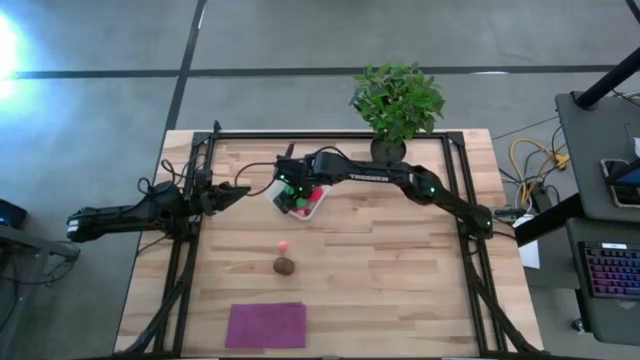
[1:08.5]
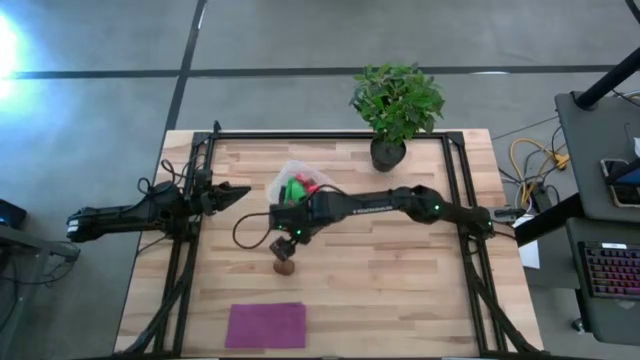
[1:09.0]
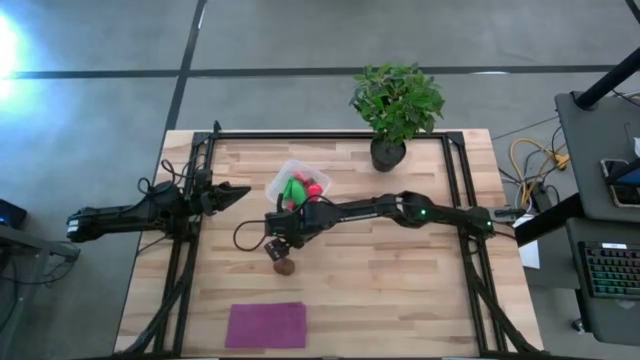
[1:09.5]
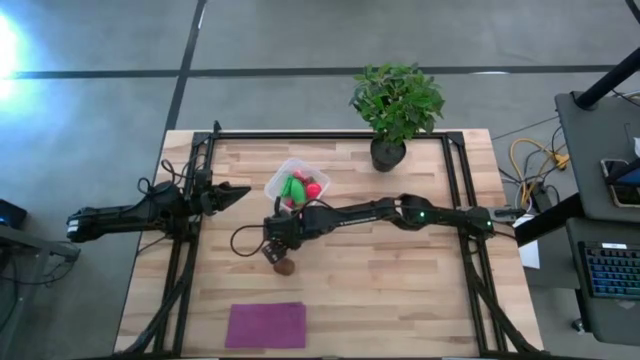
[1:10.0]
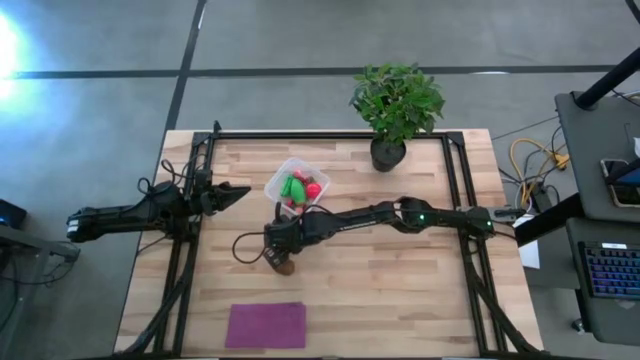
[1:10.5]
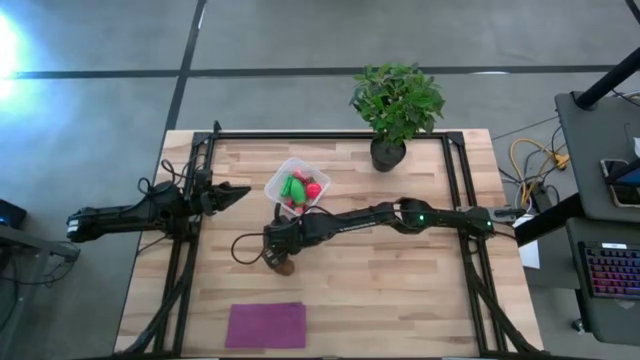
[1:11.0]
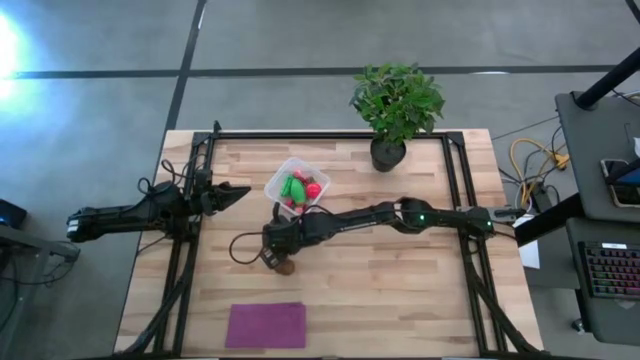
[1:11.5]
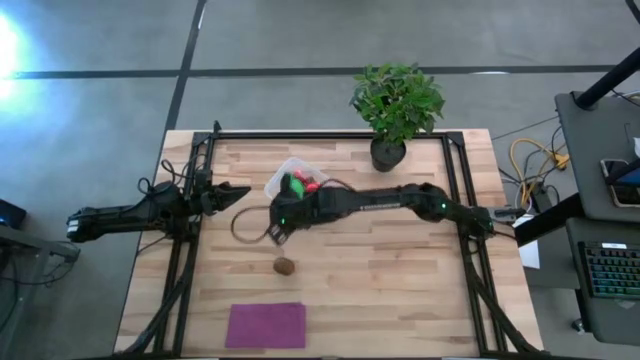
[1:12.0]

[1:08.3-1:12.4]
Task: Pick and placing Produce into tupperware
Put the peach into the transparent bin

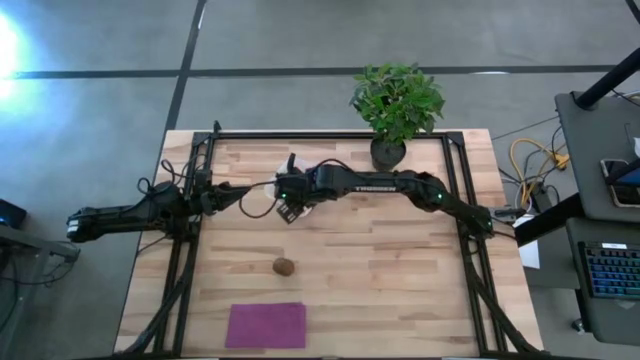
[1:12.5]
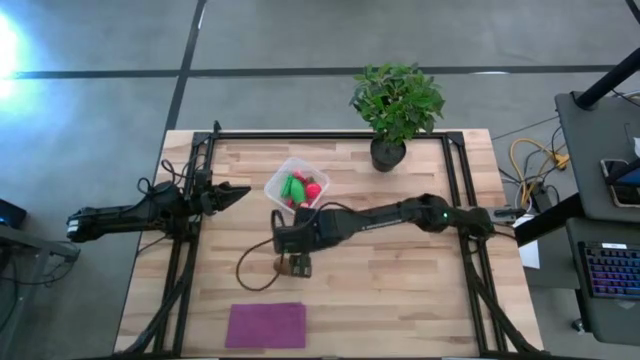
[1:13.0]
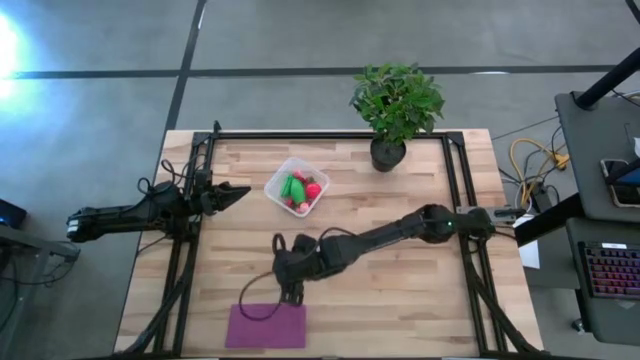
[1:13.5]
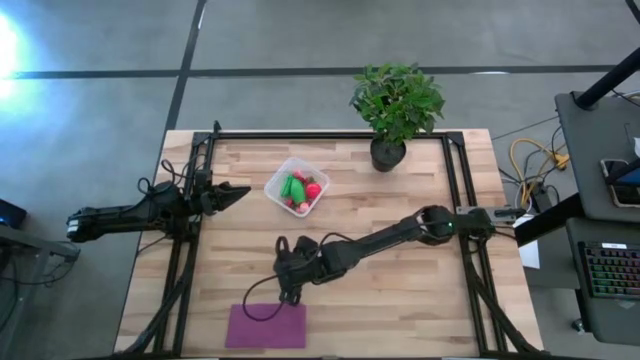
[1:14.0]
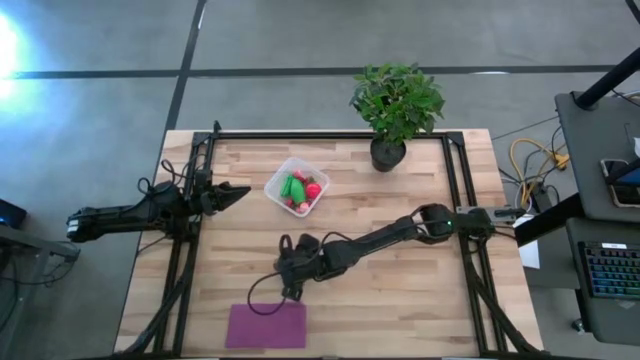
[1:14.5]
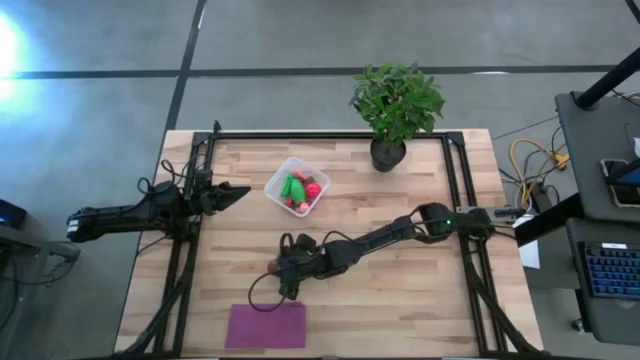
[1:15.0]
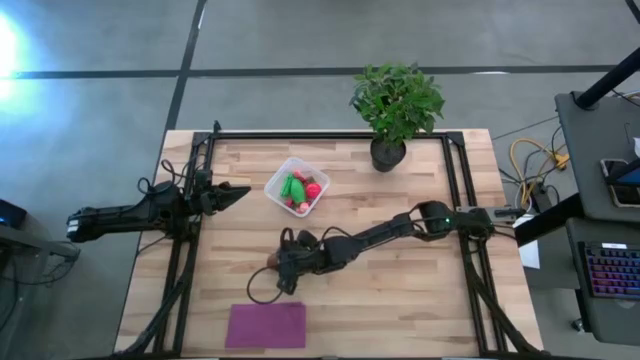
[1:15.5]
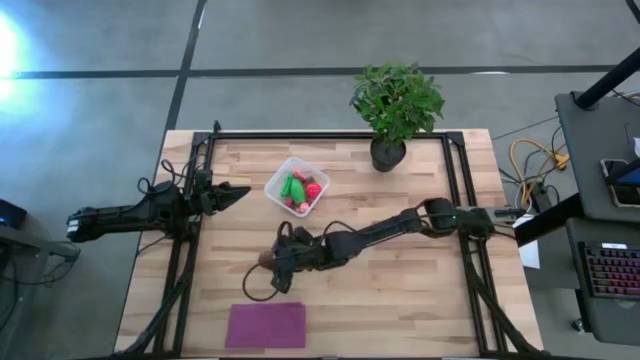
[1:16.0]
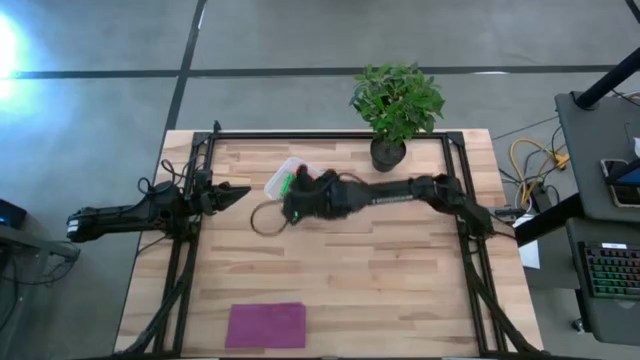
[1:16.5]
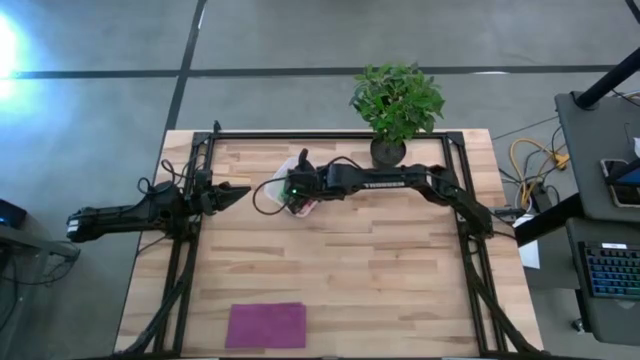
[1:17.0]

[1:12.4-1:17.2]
Put the kiwi into the transparent bin

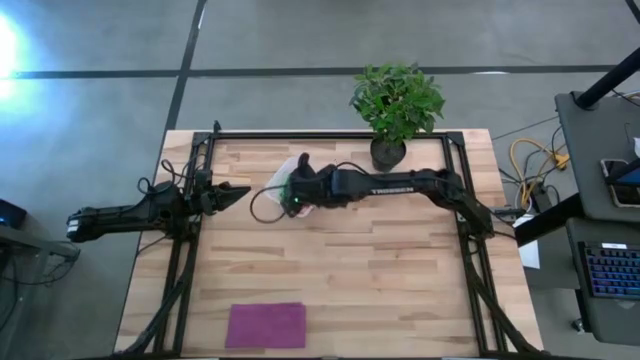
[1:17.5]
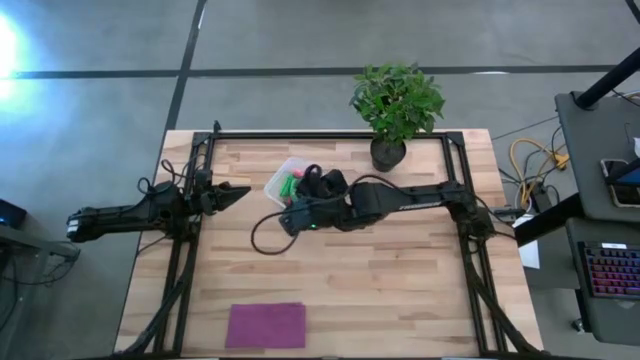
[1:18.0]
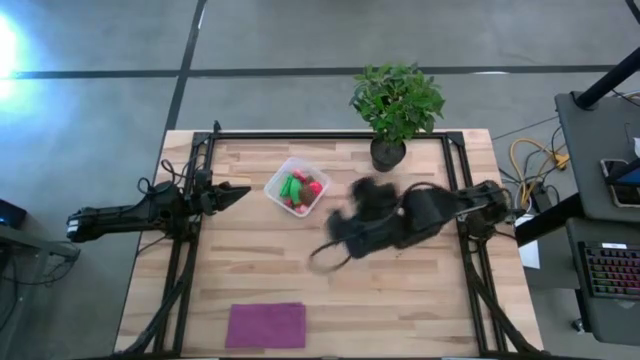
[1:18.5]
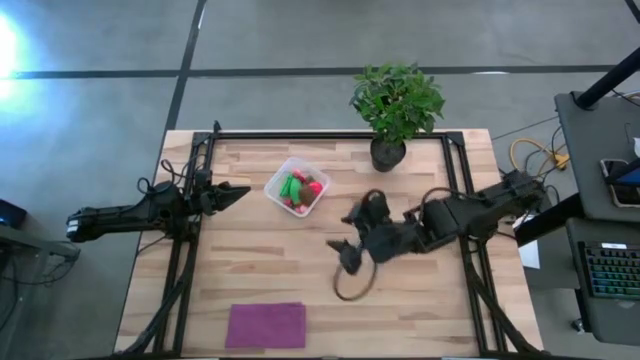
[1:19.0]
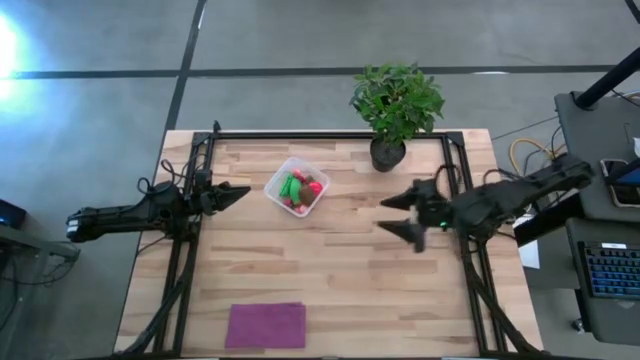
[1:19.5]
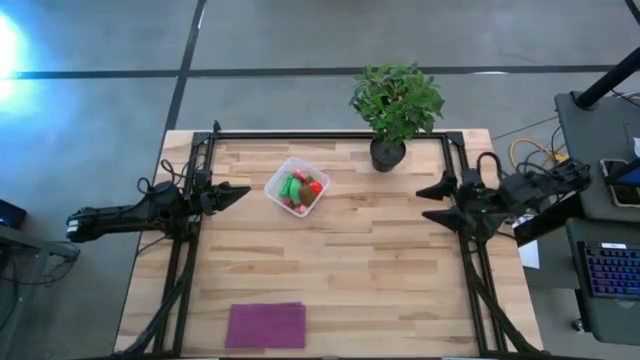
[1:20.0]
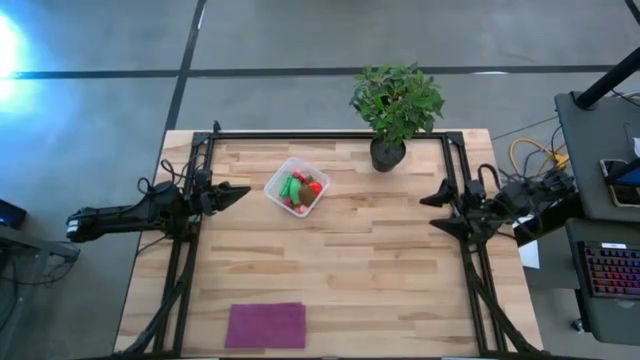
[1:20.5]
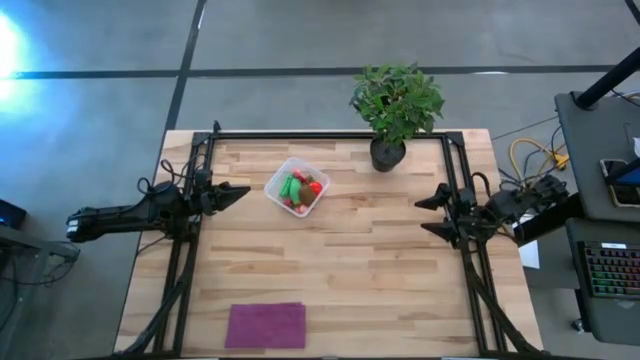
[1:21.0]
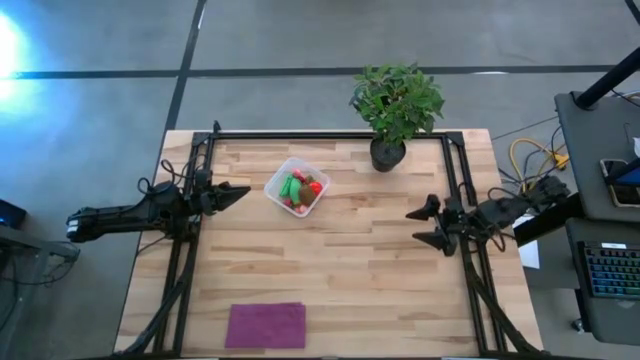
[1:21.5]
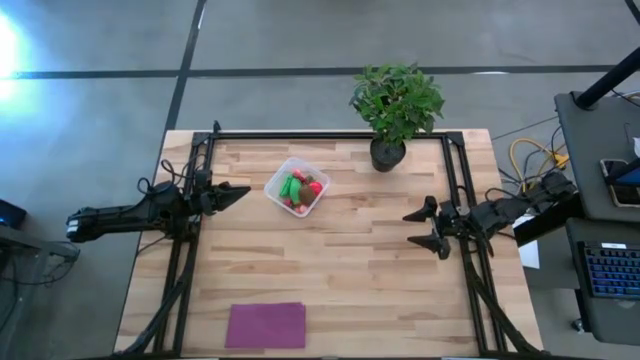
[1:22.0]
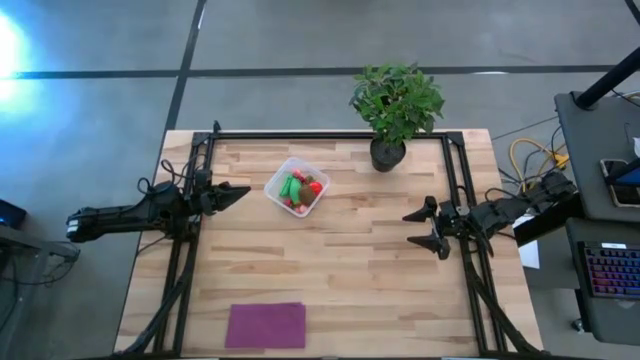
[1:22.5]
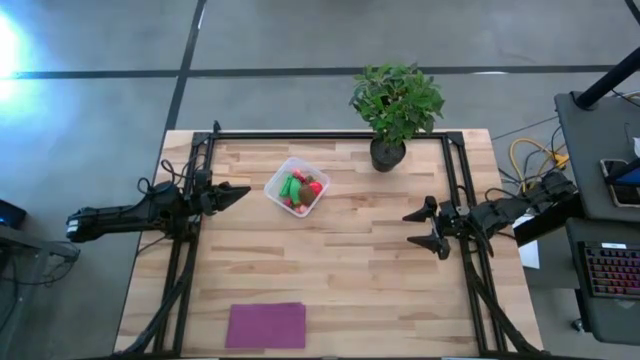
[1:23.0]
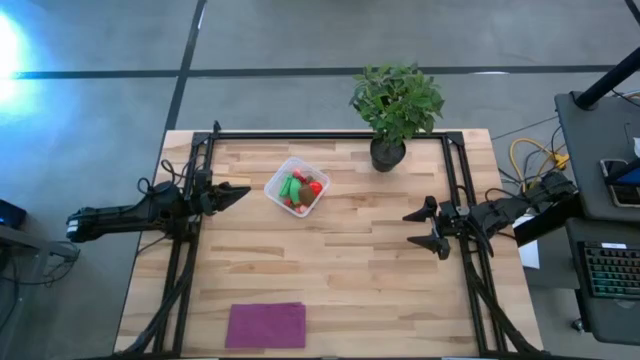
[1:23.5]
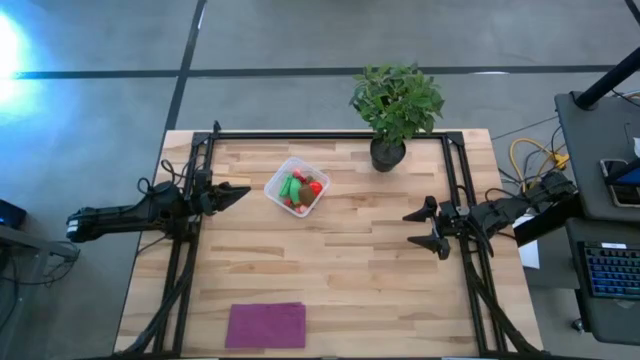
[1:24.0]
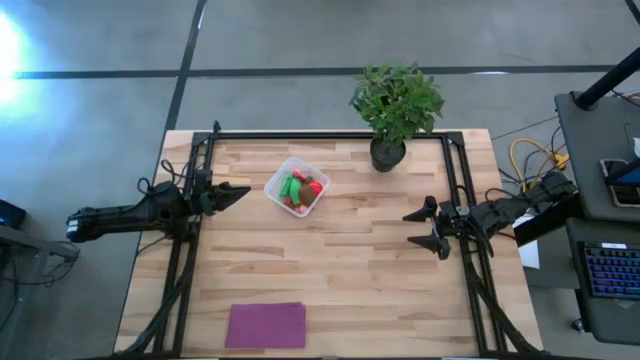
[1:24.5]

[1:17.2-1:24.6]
Return to Home Position

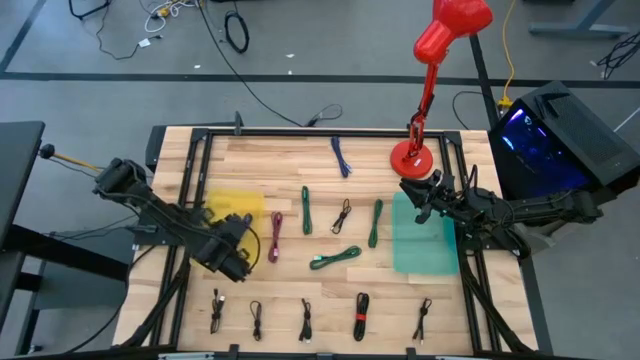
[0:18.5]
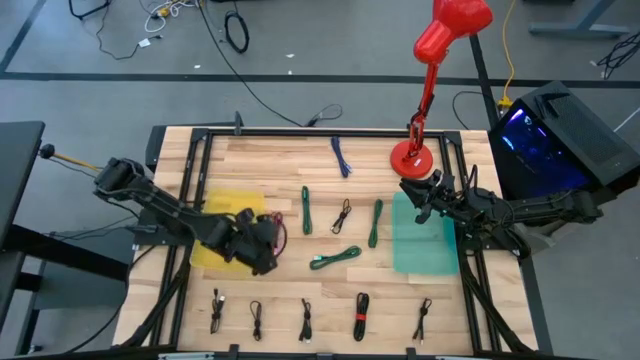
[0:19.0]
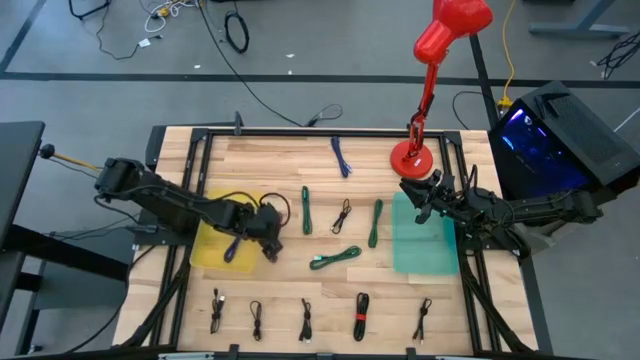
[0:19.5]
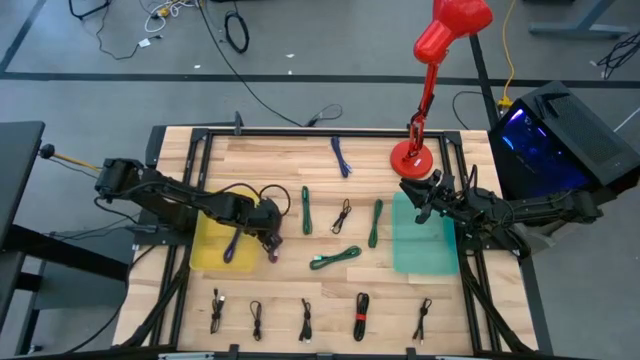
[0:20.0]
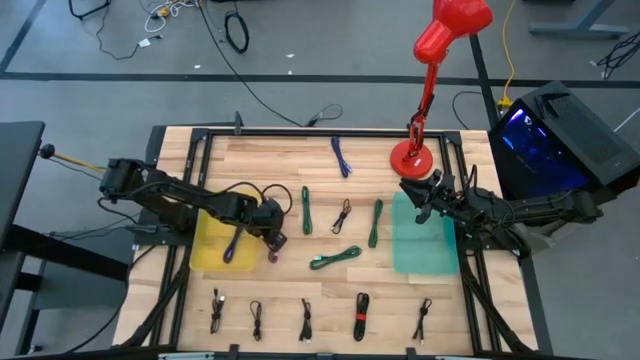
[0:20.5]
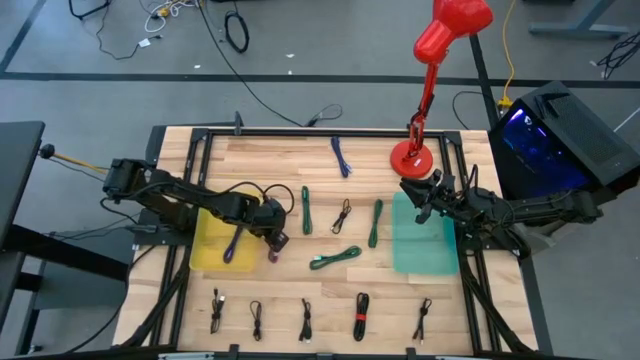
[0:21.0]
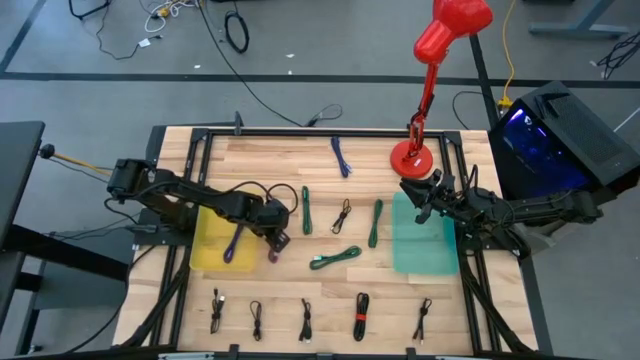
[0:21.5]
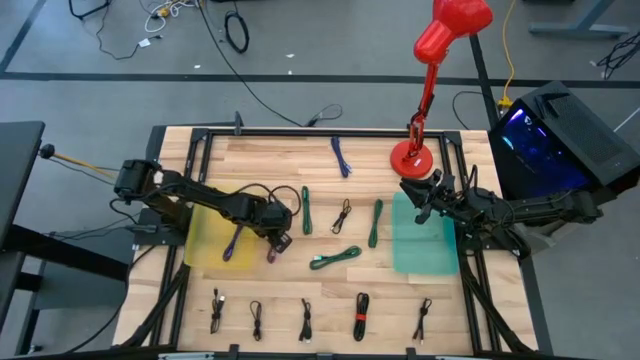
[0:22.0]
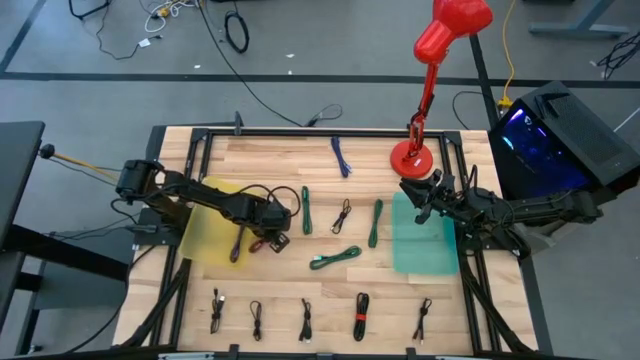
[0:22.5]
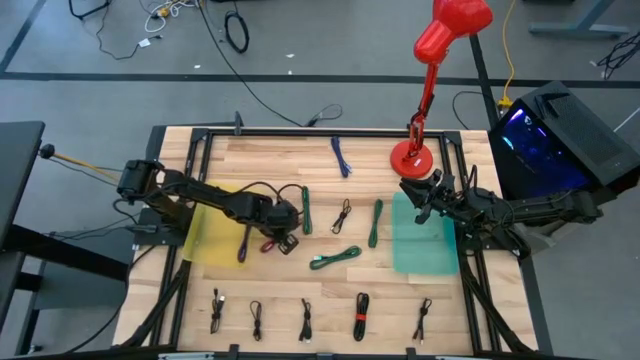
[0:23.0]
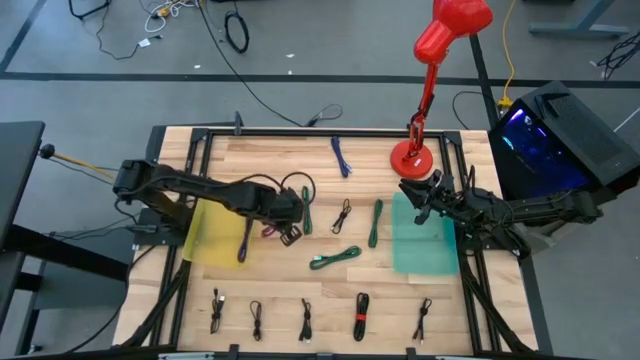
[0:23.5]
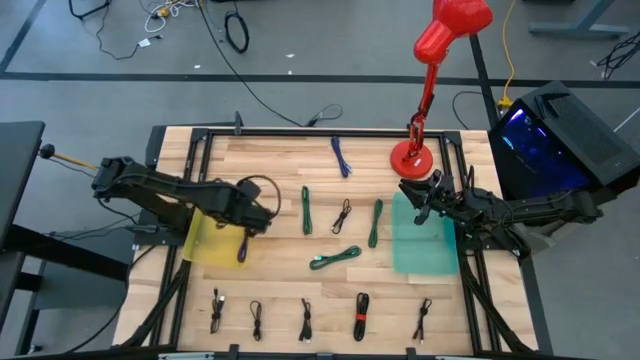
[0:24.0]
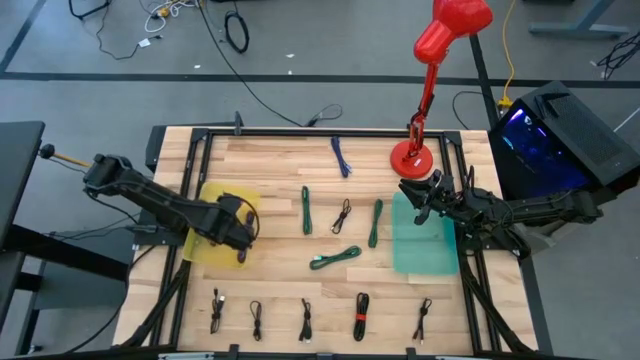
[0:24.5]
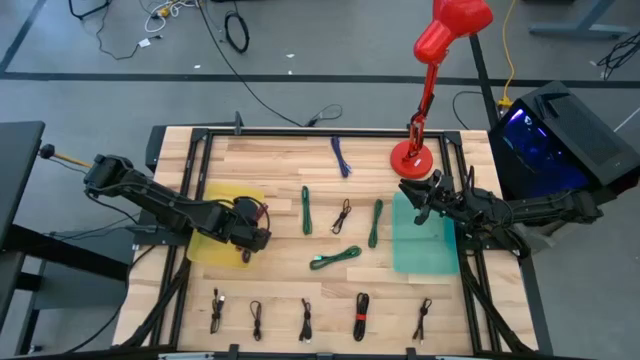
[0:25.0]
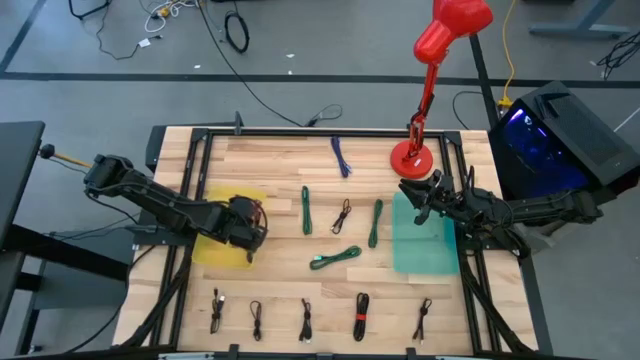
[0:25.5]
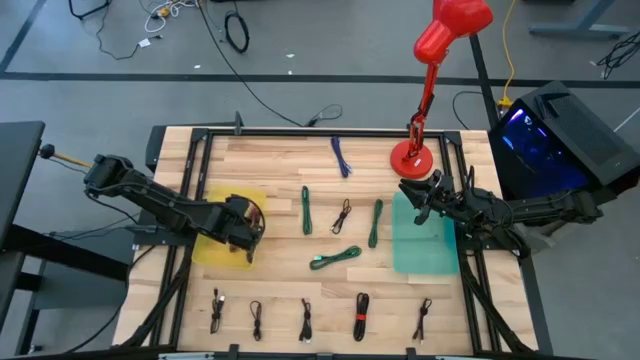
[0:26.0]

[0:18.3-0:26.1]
Task: Pick & Place USB Port
Put the black and pink charger cable into the yellow bin
